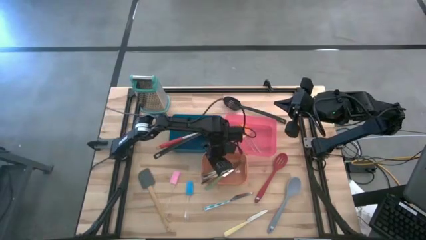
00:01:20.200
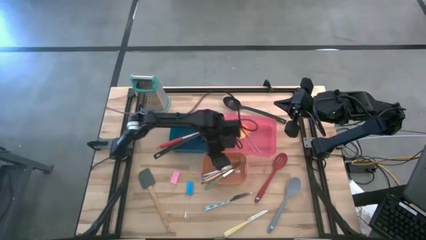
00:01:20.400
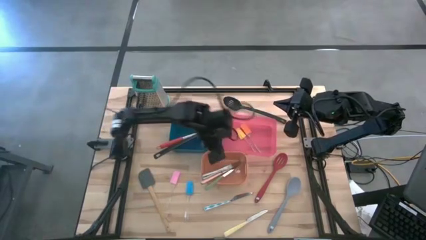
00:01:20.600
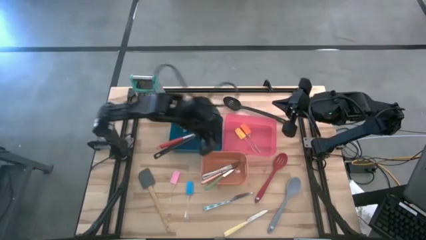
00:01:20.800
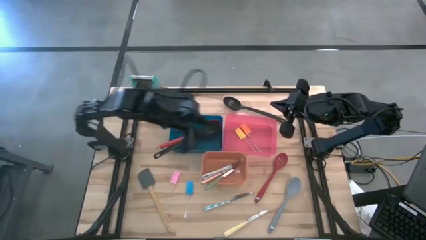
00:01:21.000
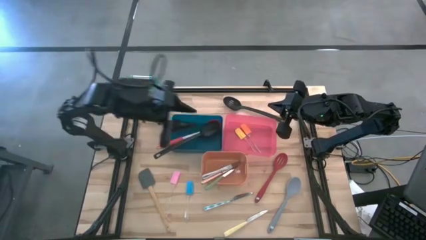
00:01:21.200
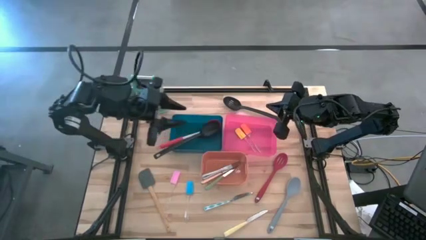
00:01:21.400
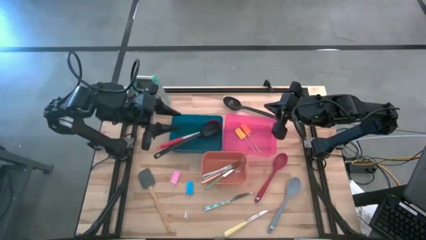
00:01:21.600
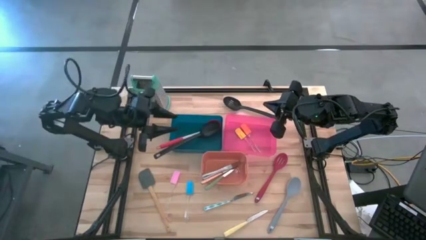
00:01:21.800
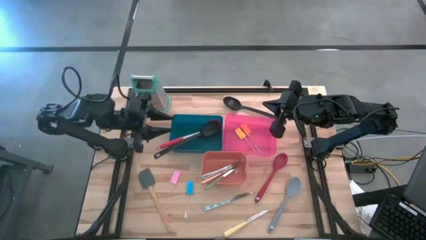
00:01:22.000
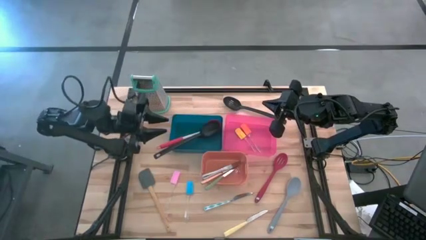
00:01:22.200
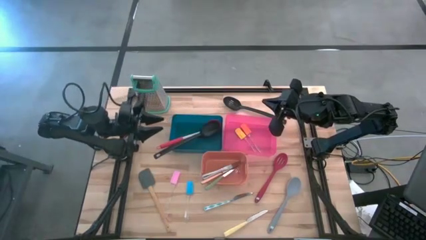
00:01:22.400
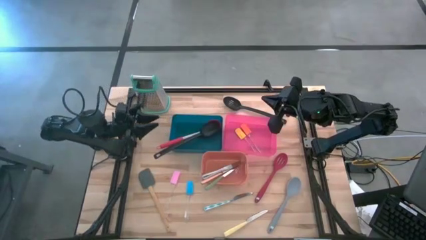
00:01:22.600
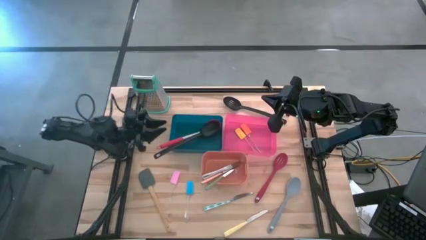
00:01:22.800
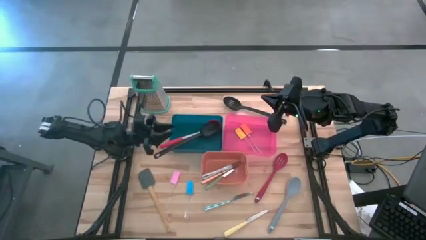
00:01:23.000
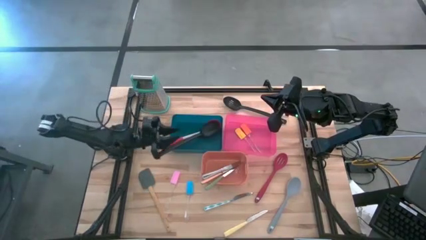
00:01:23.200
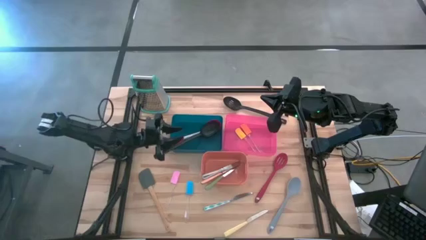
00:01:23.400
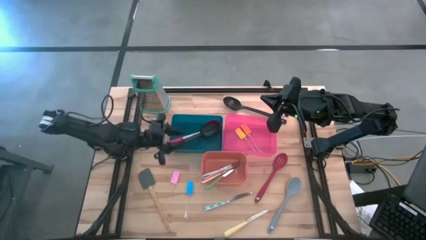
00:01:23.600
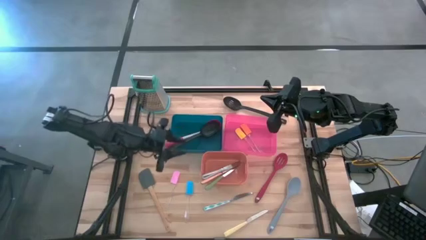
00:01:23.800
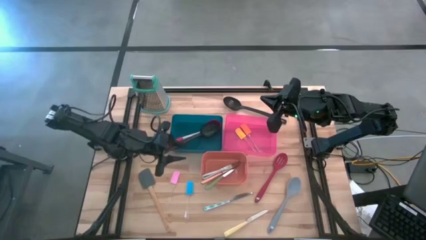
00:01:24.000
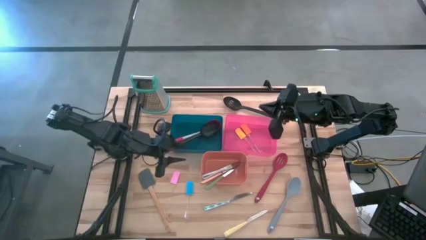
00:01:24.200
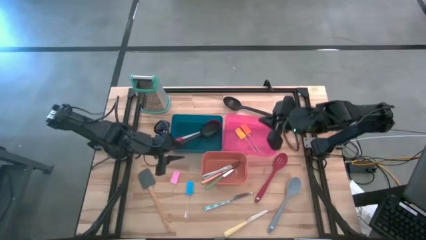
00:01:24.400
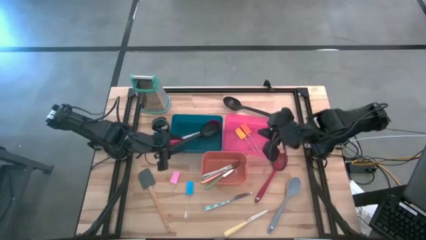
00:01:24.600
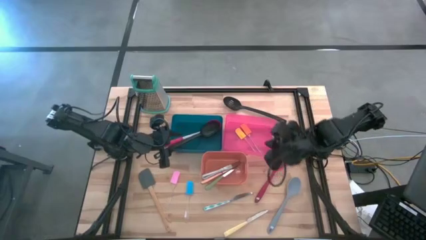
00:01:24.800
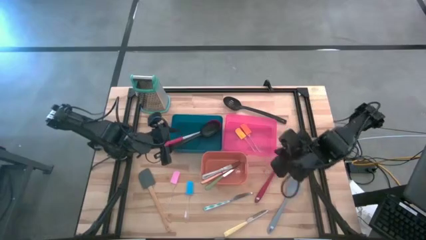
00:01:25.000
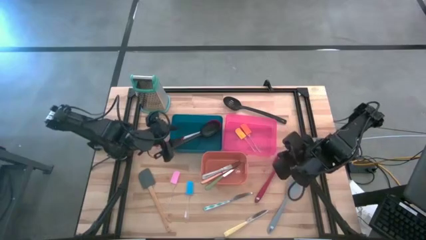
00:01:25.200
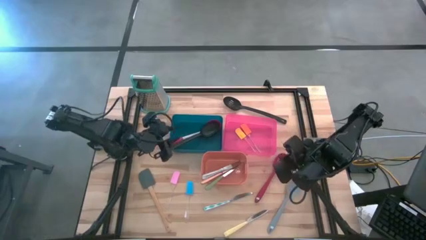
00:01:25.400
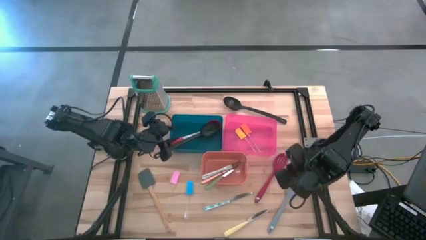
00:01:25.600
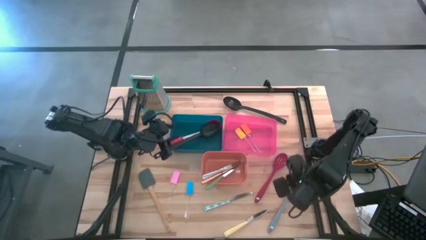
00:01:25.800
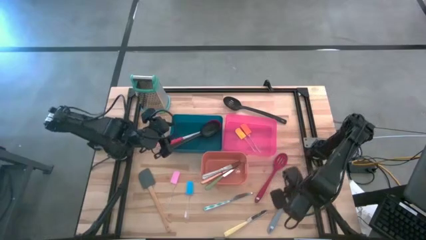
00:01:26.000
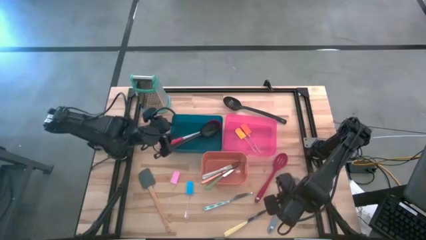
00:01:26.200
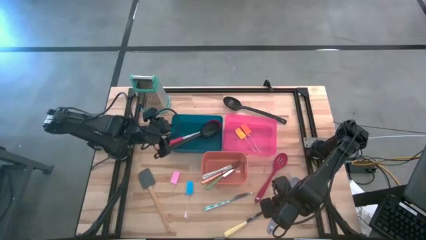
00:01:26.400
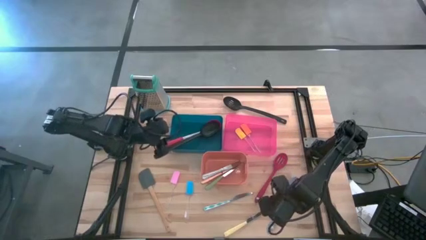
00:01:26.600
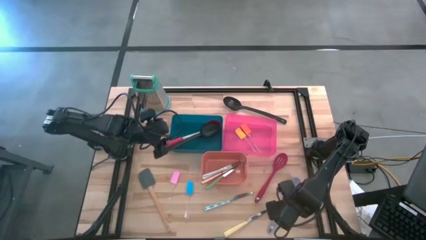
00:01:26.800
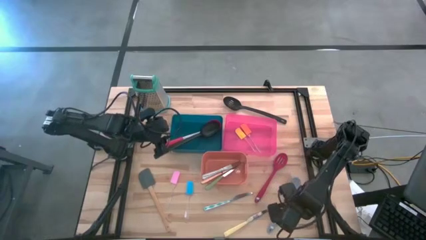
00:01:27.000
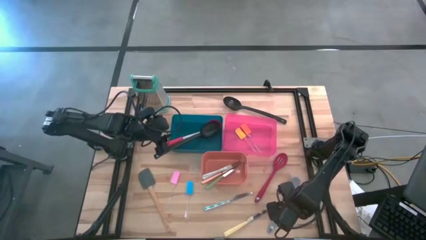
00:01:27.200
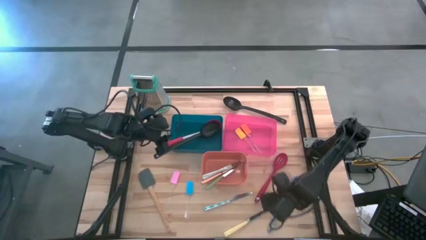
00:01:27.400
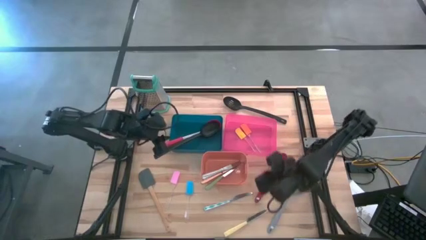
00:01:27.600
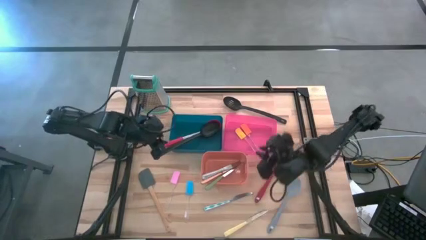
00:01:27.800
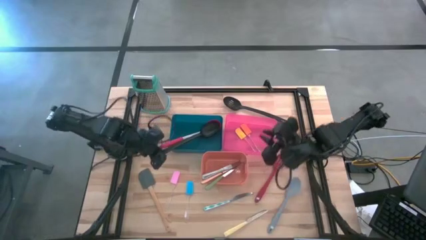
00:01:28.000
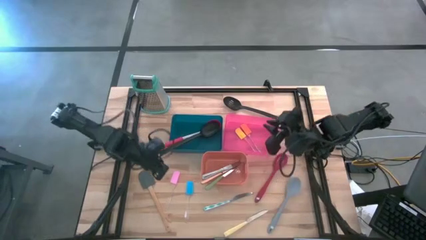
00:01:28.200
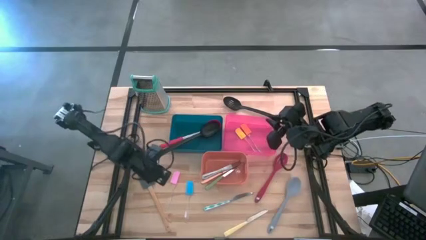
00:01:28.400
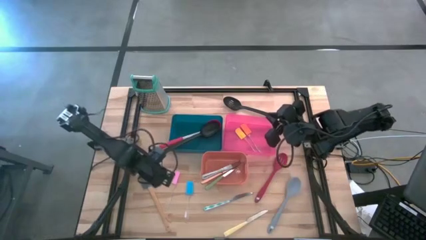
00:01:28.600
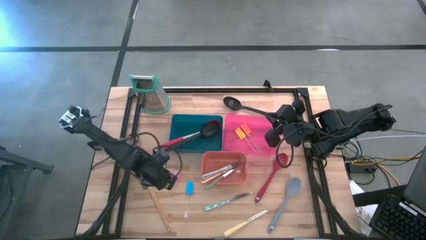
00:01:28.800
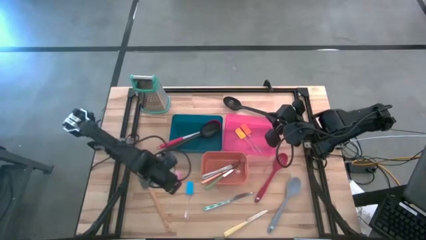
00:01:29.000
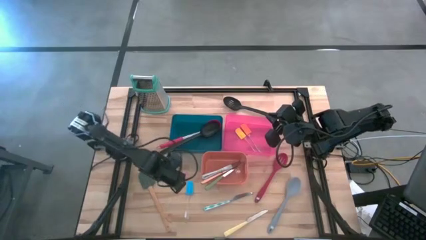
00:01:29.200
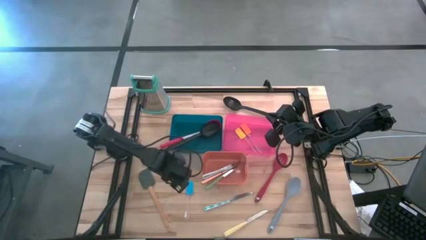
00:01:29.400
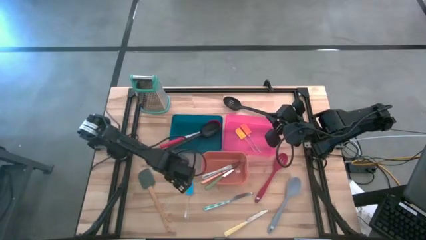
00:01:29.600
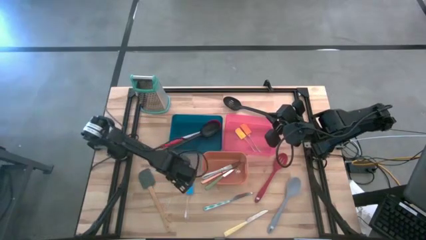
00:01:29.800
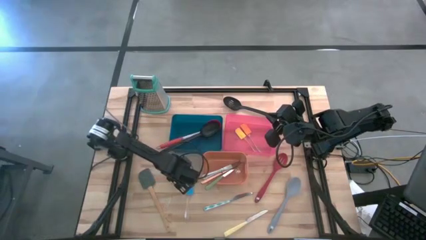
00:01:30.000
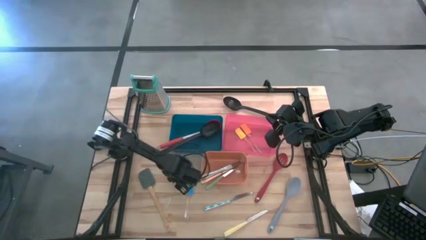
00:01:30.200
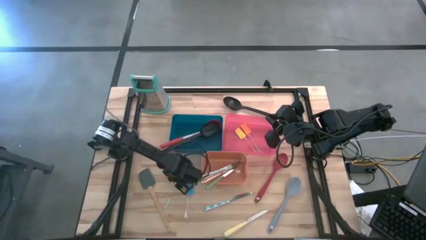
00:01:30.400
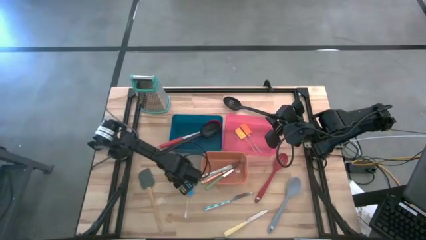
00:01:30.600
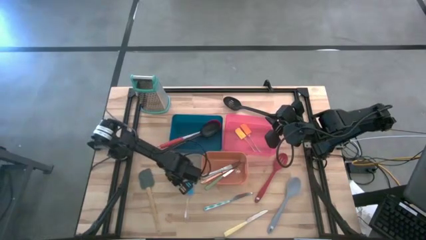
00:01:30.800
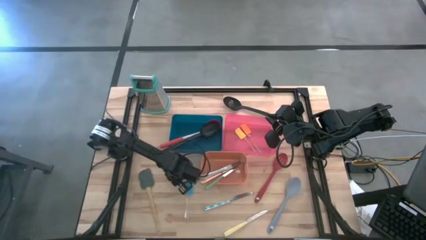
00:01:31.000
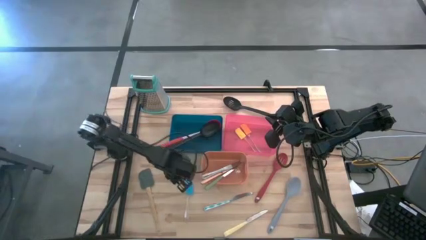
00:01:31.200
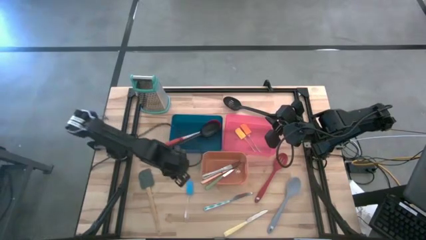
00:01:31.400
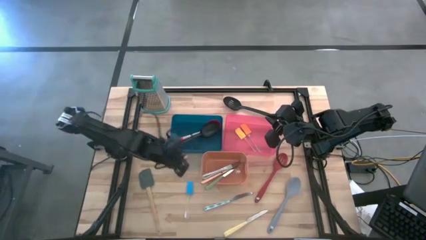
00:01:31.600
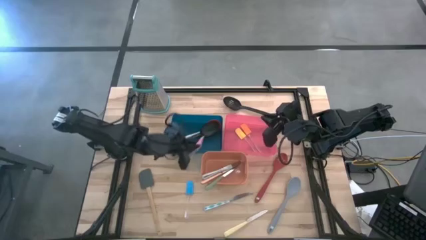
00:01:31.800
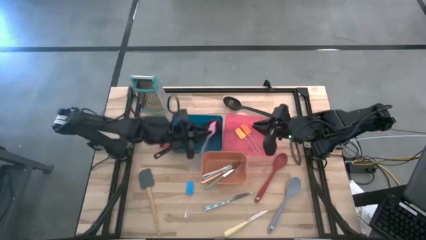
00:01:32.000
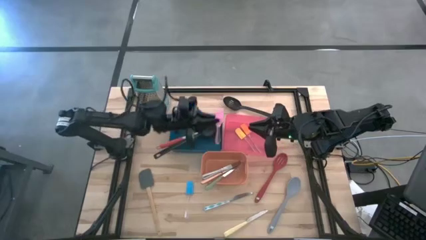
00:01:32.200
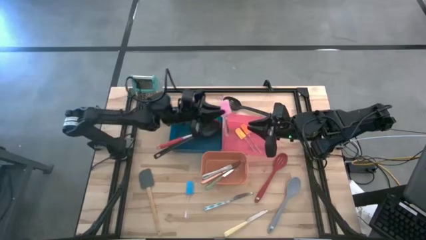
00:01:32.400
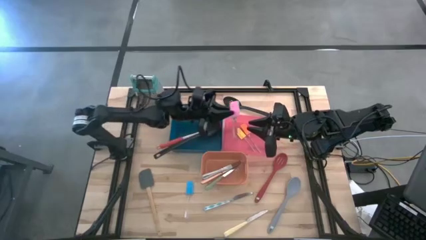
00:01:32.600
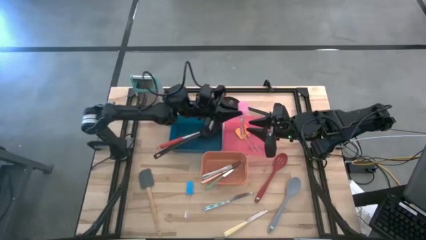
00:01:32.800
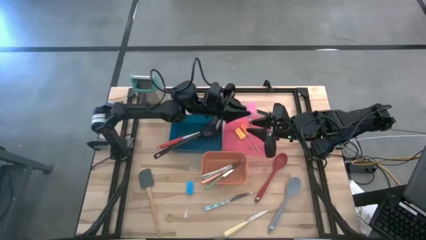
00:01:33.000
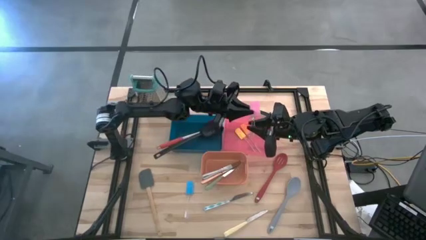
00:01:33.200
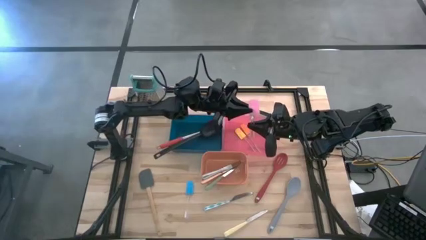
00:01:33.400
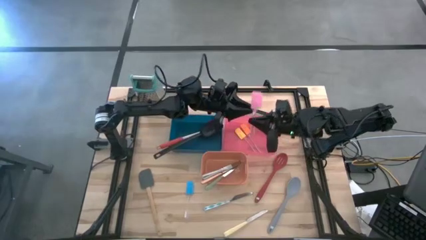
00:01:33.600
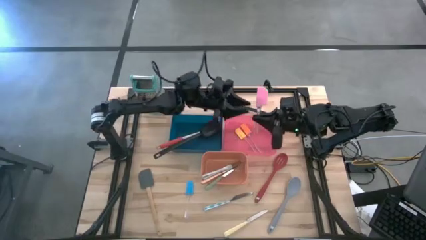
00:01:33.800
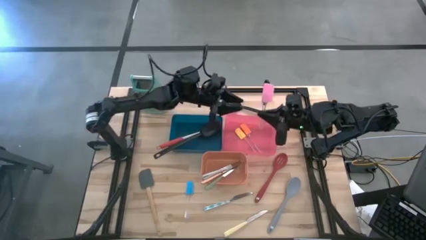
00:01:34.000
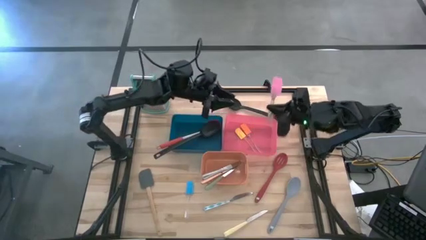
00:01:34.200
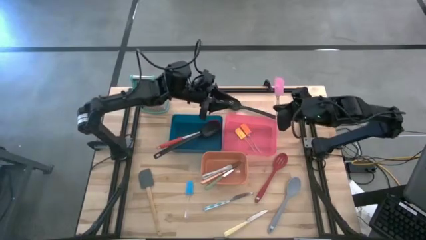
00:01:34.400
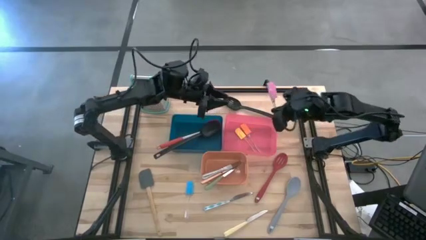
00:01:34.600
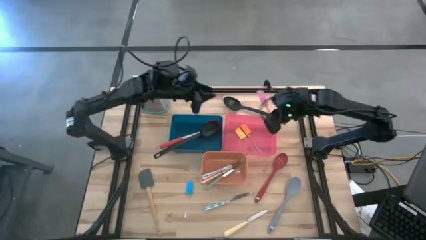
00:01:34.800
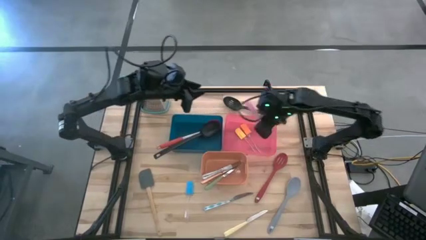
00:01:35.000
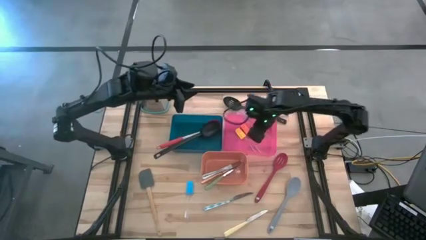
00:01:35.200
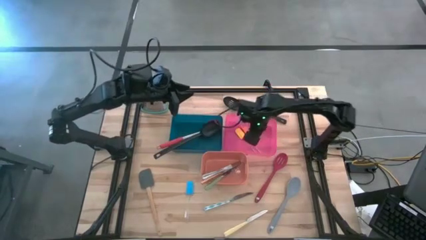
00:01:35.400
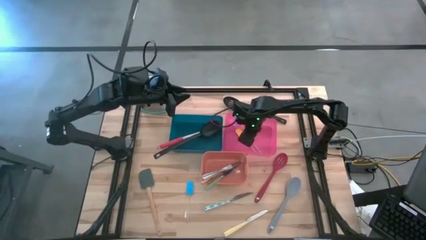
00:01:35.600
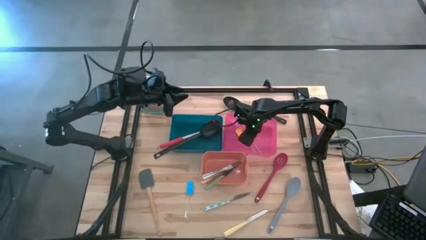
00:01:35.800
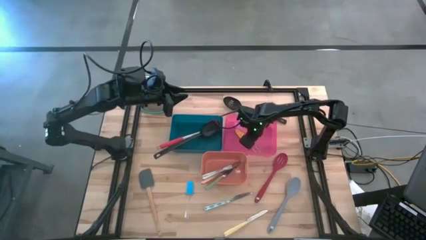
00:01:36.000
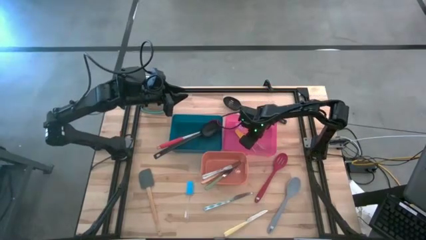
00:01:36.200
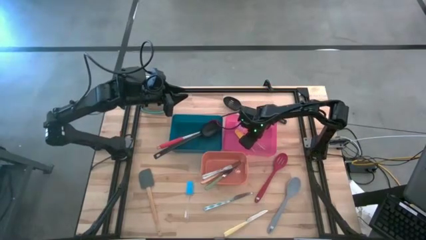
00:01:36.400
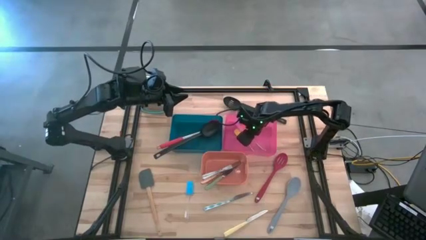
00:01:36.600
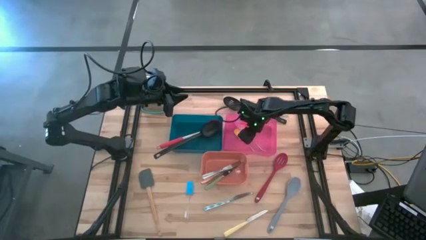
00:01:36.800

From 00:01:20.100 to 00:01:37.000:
Task: Pick & Place Kitchen Items
Put the pink spatula into the red bin
